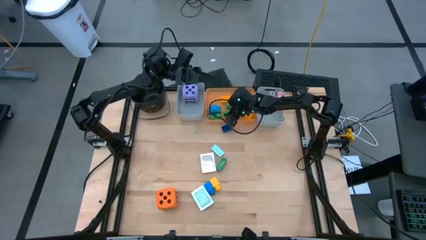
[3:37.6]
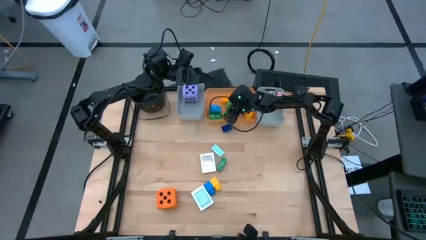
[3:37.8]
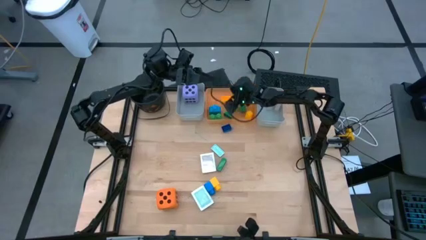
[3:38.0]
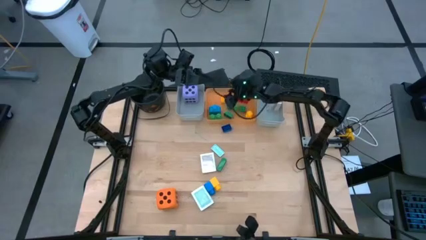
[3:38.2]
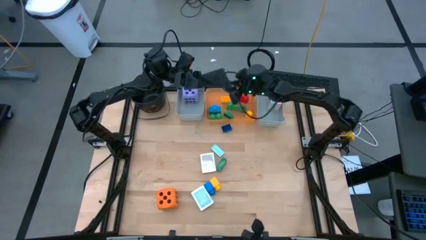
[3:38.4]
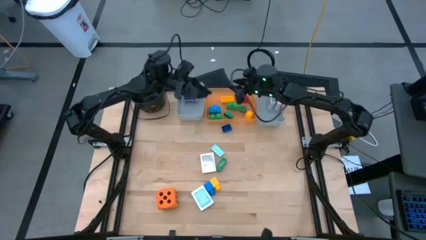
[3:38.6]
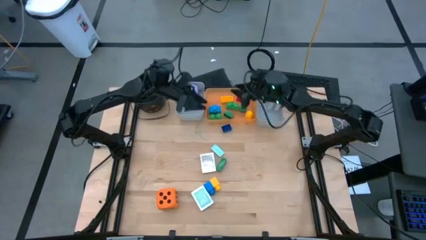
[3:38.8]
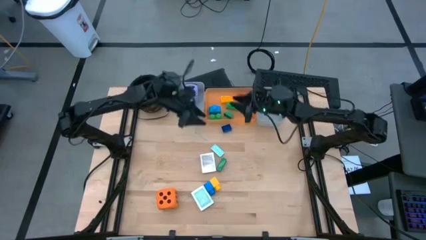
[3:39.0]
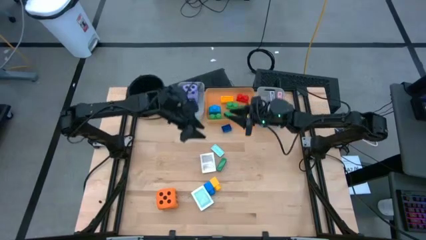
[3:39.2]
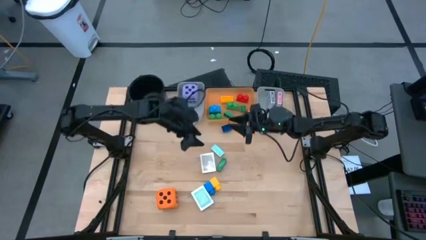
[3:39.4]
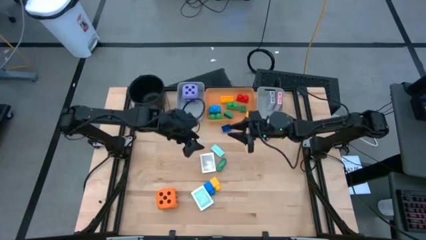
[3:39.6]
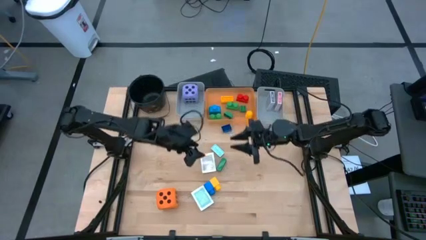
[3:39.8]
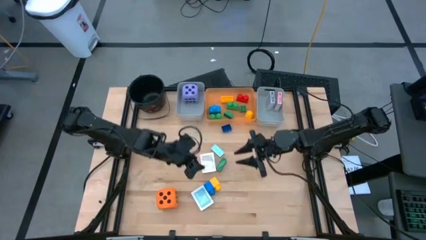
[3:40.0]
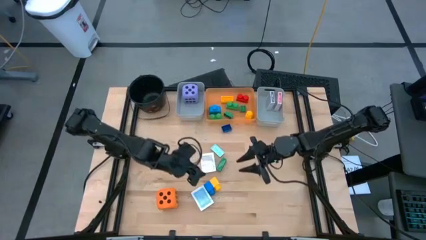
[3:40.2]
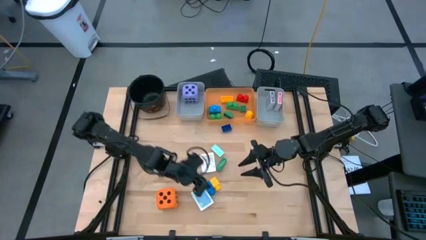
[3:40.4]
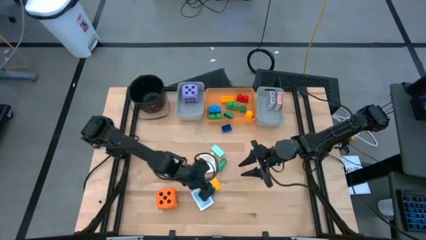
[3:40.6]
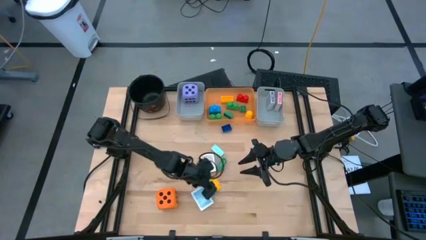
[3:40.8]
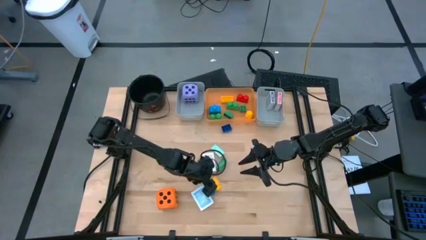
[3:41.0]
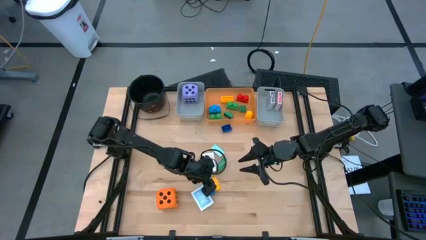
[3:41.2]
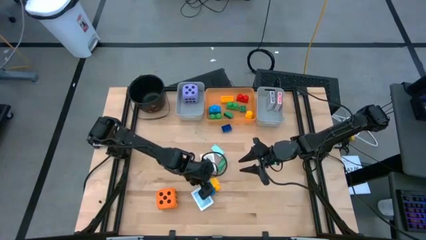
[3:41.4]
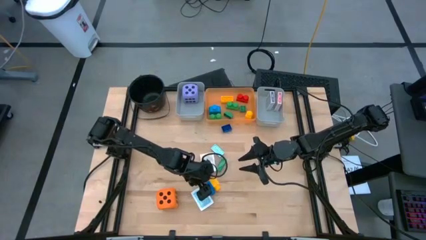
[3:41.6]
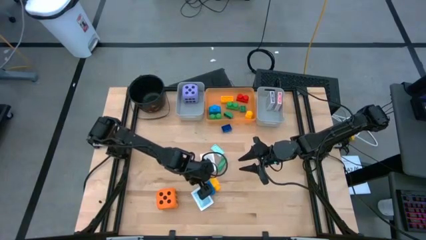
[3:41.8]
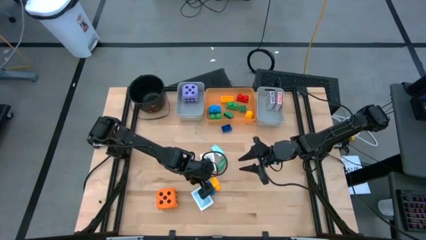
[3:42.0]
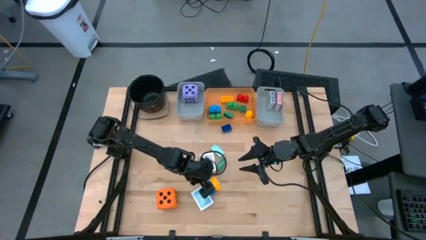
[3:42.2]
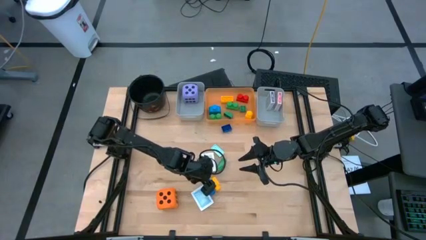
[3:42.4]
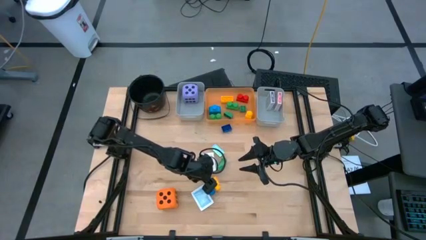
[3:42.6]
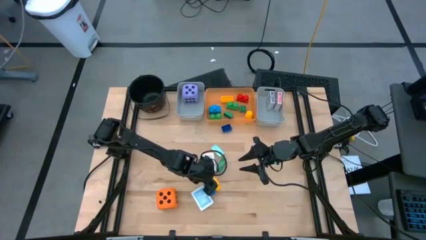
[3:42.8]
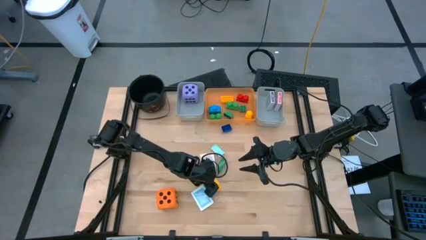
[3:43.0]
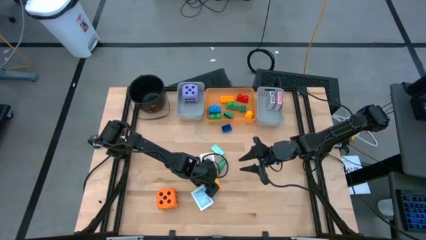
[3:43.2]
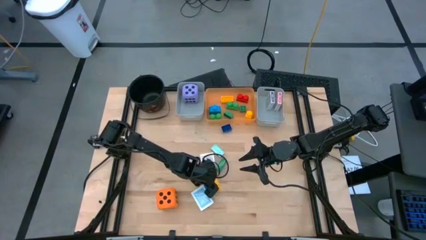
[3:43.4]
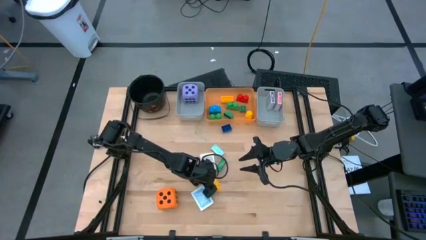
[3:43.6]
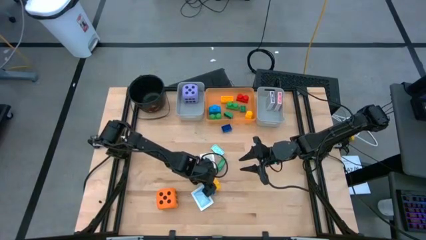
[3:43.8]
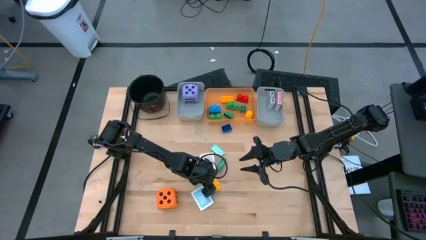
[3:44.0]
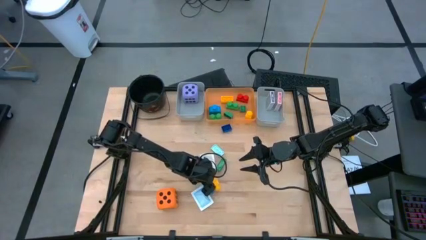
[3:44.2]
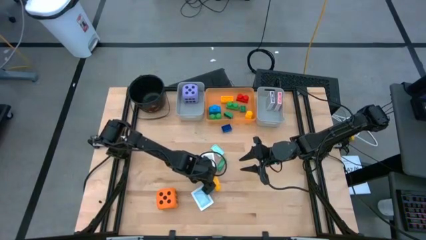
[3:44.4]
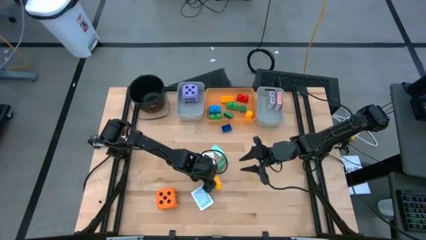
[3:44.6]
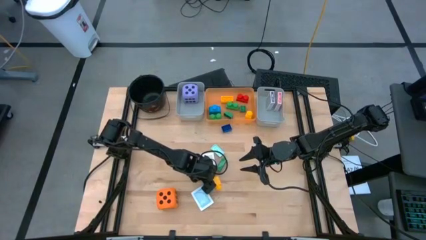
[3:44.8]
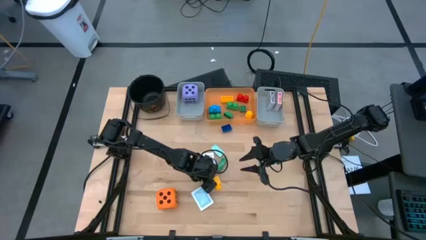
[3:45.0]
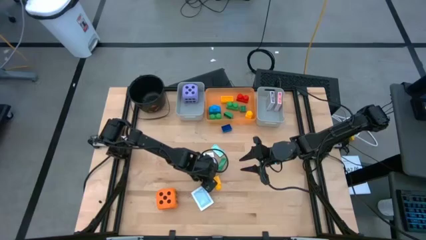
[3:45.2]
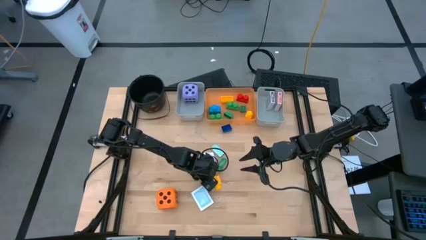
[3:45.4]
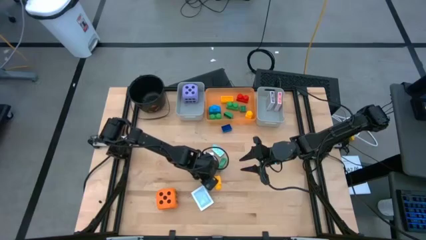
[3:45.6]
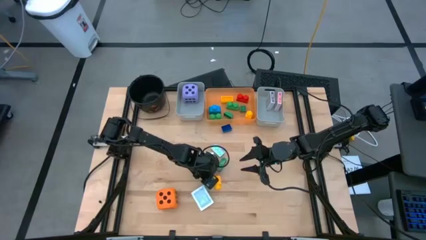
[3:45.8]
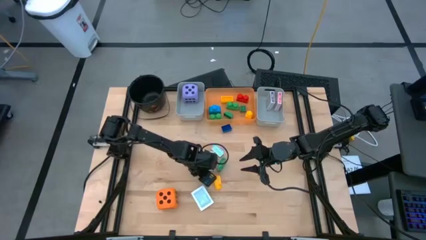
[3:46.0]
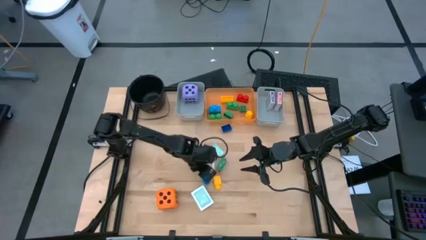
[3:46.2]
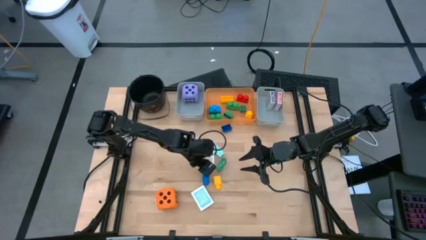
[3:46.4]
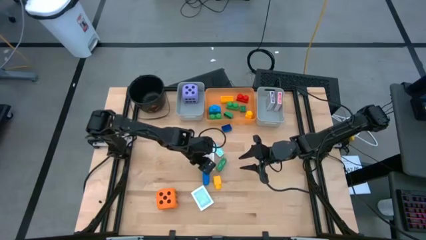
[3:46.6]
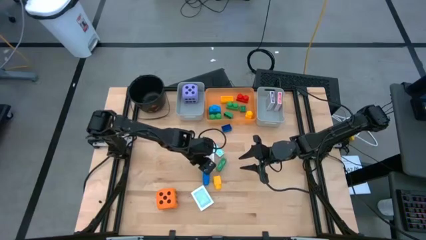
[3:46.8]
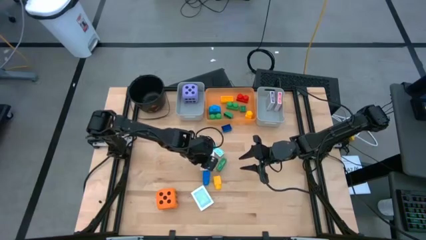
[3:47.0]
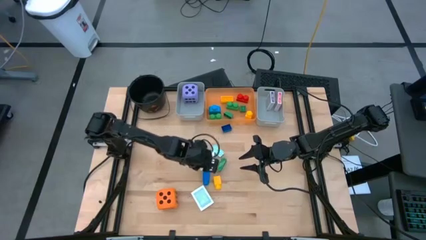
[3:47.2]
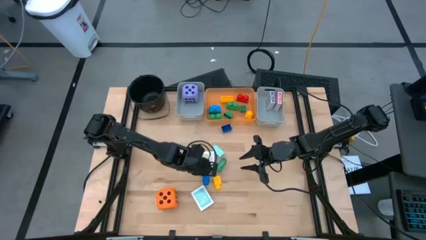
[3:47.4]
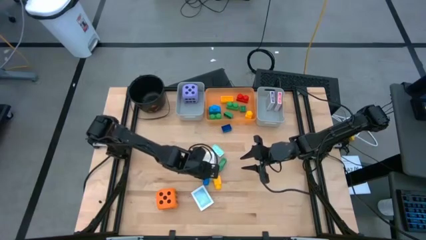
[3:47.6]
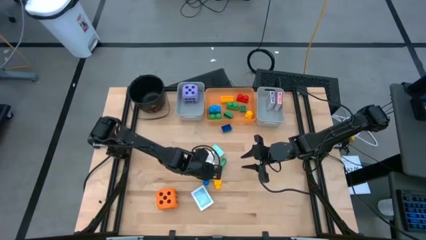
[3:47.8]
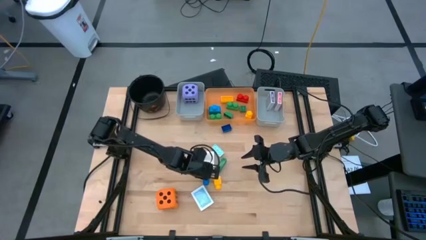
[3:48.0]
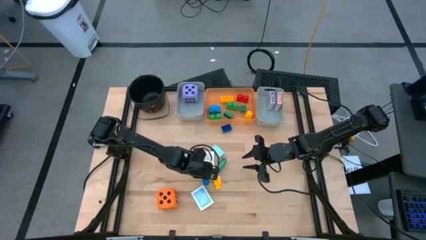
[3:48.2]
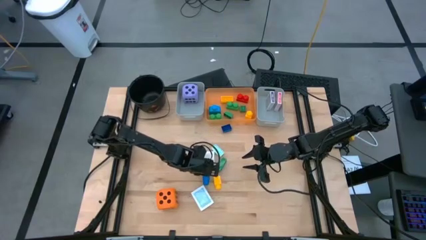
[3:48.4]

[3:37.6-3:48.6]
Task: Pick & Place Toys
Put the blue game piece into the orange bin
